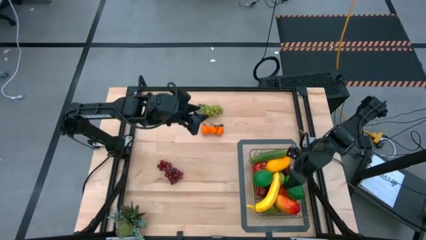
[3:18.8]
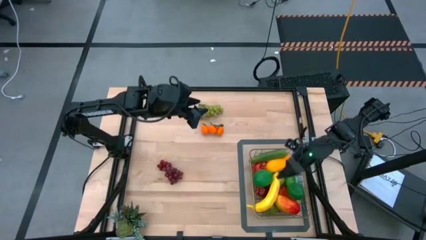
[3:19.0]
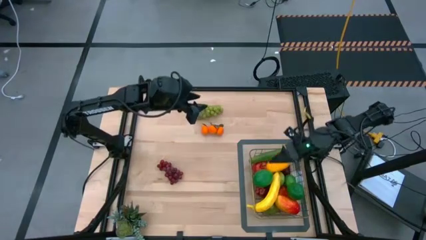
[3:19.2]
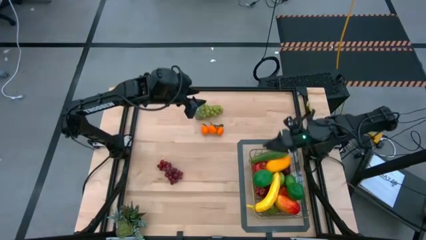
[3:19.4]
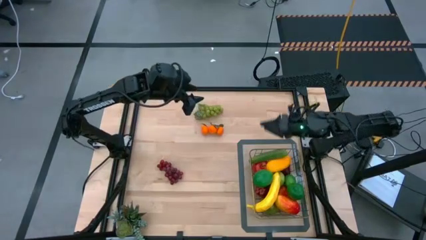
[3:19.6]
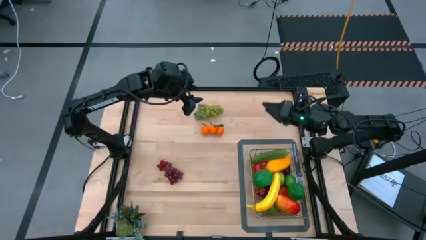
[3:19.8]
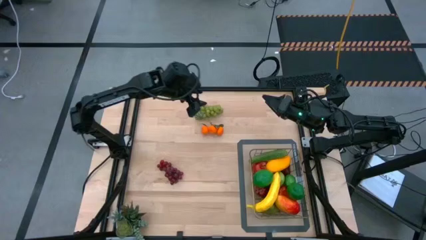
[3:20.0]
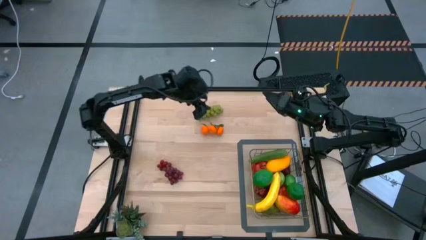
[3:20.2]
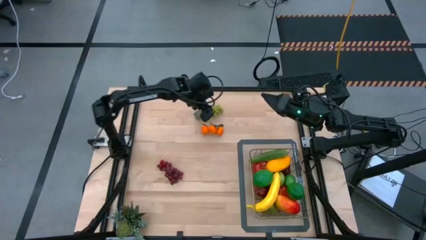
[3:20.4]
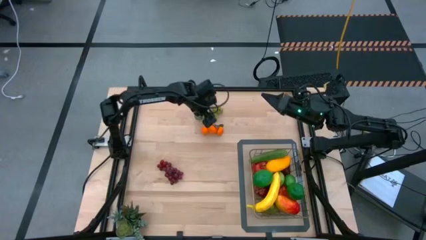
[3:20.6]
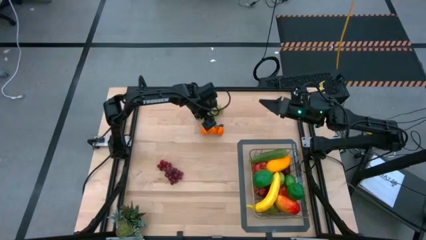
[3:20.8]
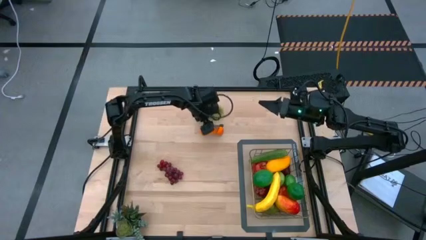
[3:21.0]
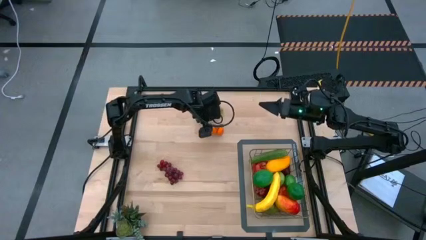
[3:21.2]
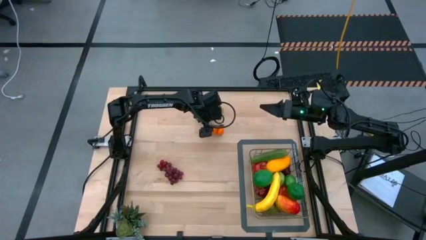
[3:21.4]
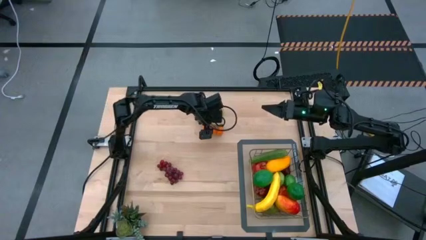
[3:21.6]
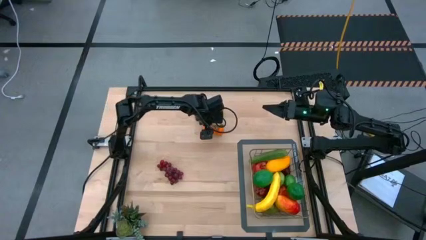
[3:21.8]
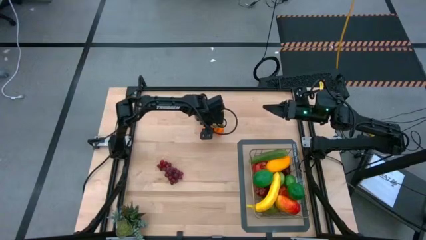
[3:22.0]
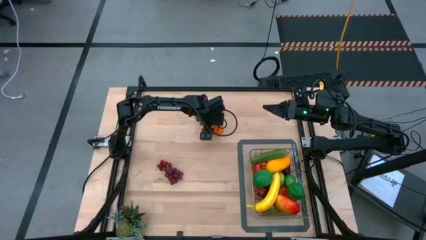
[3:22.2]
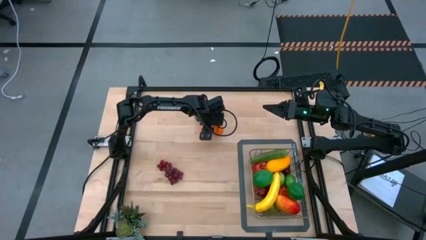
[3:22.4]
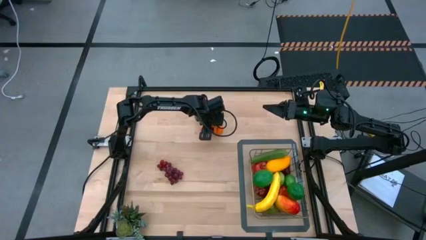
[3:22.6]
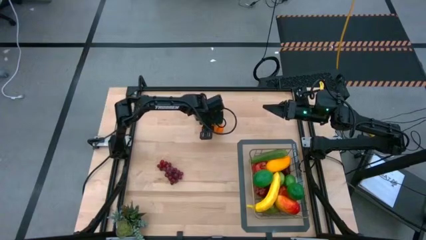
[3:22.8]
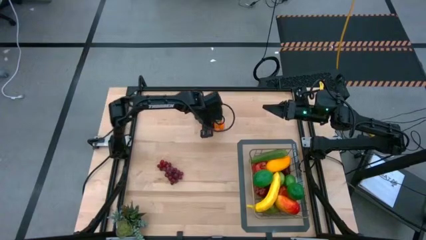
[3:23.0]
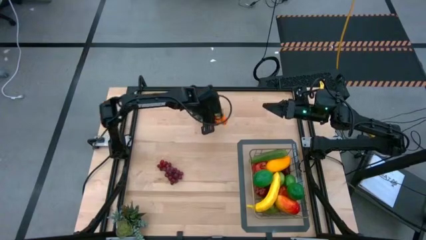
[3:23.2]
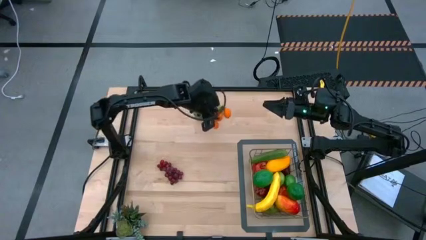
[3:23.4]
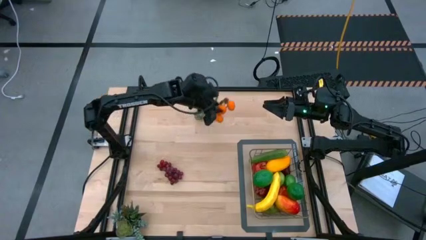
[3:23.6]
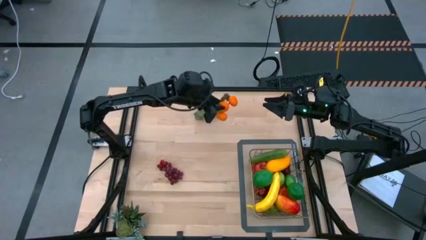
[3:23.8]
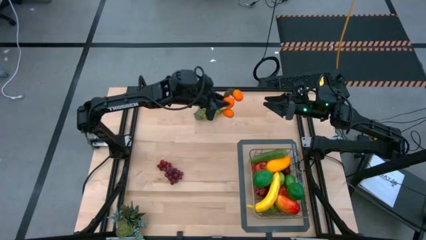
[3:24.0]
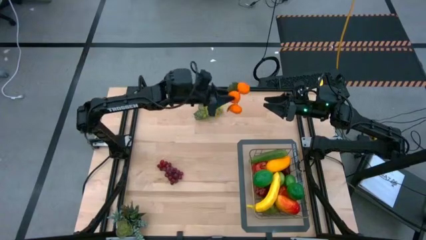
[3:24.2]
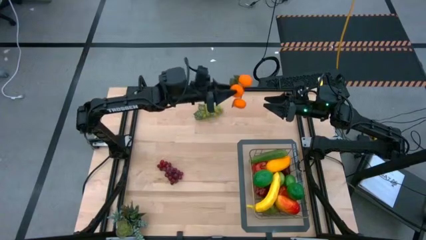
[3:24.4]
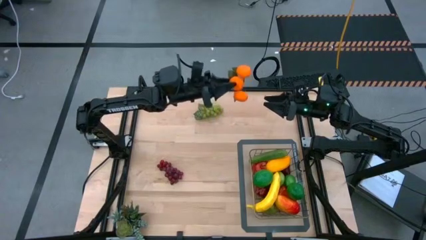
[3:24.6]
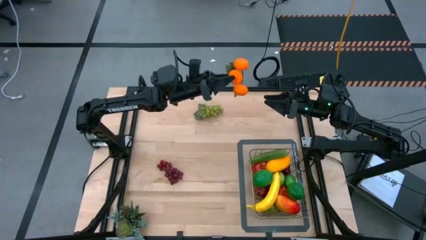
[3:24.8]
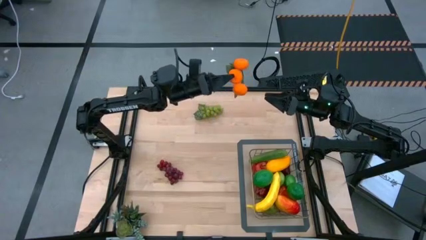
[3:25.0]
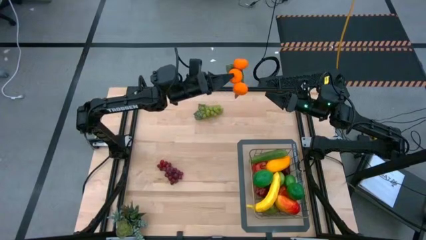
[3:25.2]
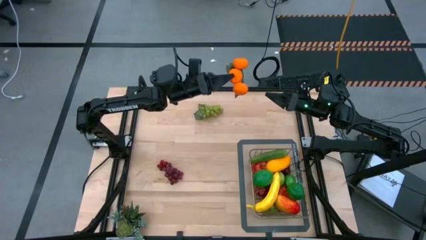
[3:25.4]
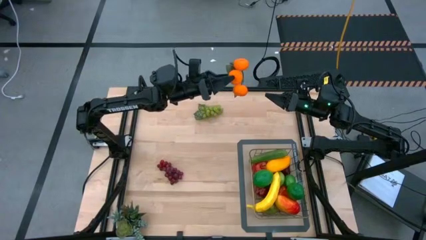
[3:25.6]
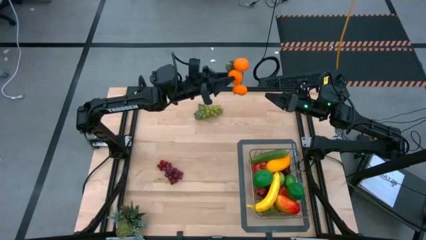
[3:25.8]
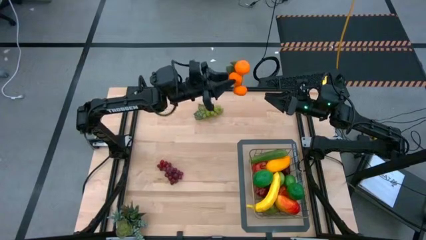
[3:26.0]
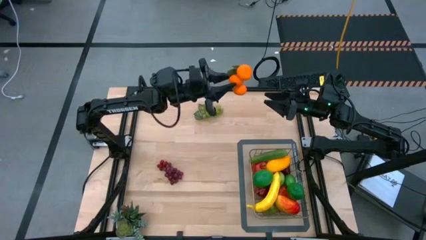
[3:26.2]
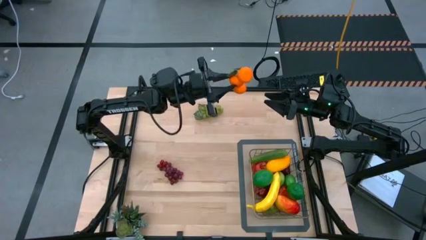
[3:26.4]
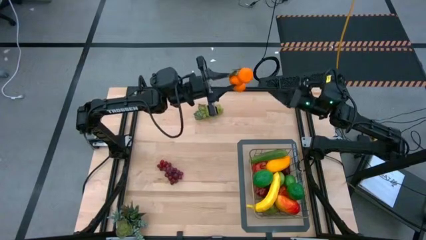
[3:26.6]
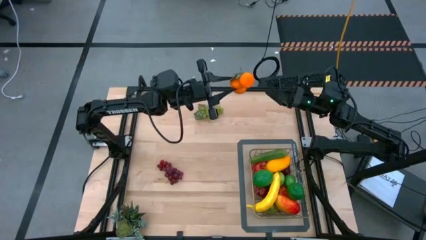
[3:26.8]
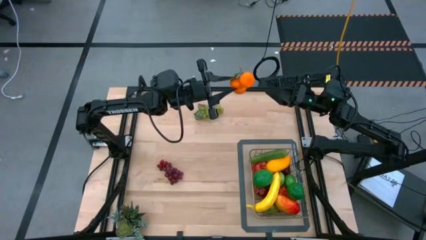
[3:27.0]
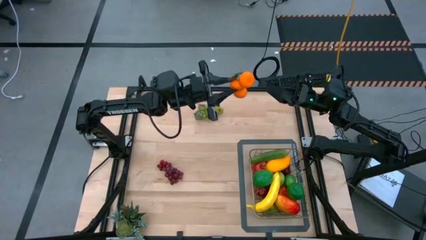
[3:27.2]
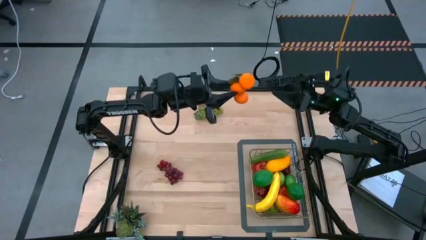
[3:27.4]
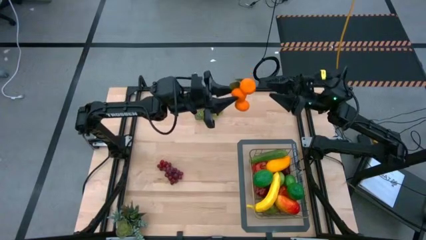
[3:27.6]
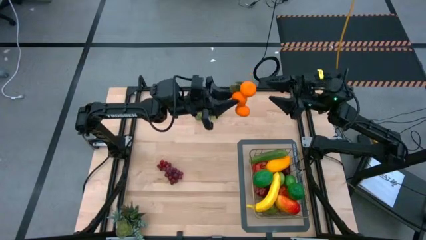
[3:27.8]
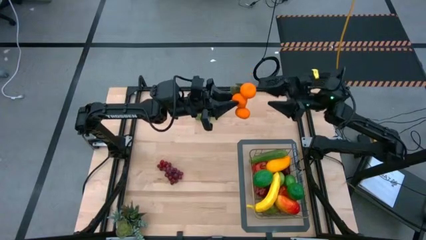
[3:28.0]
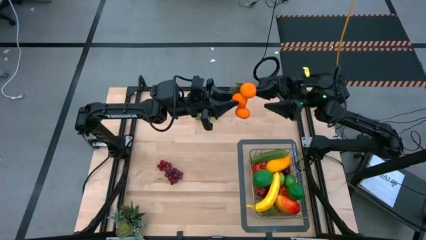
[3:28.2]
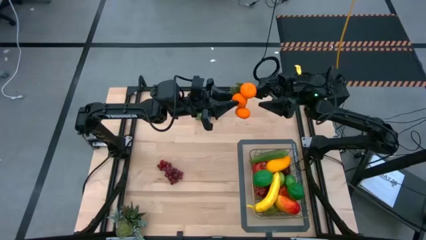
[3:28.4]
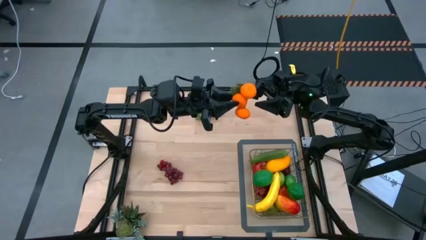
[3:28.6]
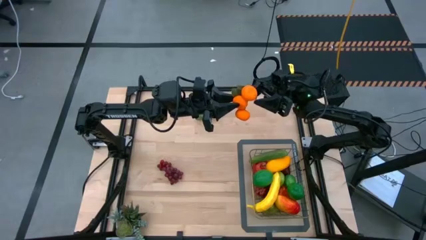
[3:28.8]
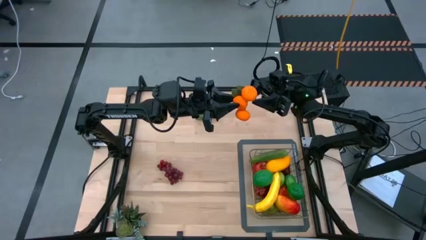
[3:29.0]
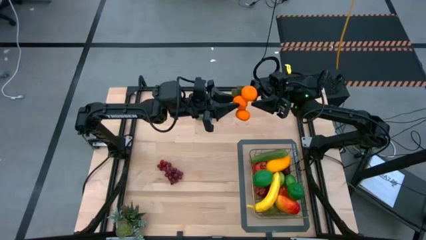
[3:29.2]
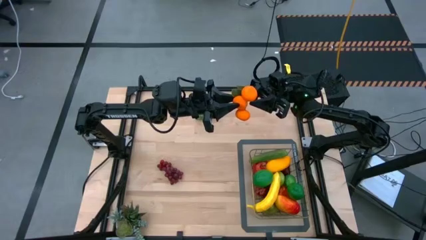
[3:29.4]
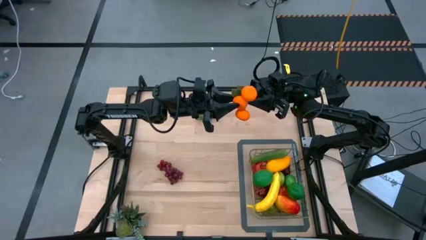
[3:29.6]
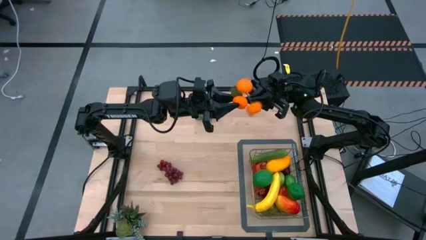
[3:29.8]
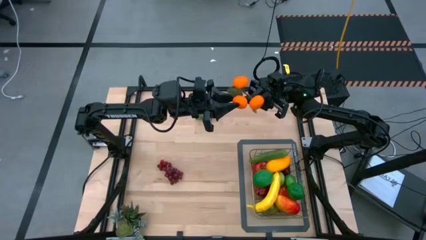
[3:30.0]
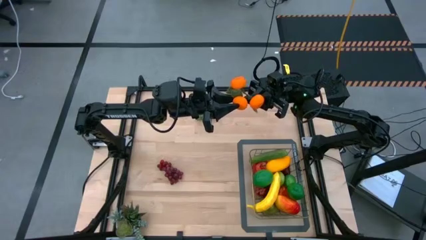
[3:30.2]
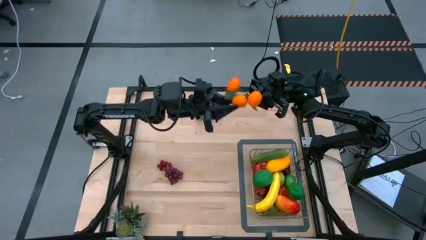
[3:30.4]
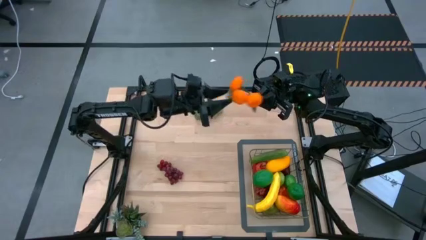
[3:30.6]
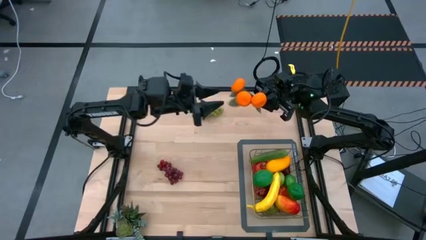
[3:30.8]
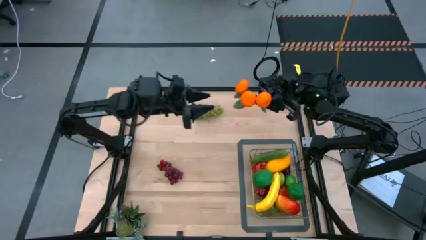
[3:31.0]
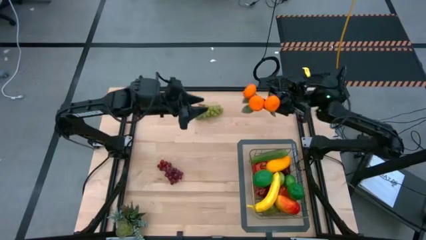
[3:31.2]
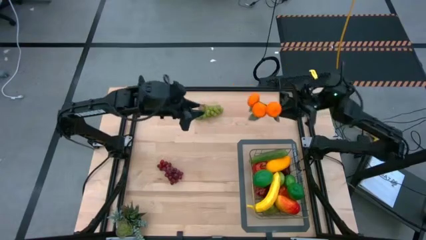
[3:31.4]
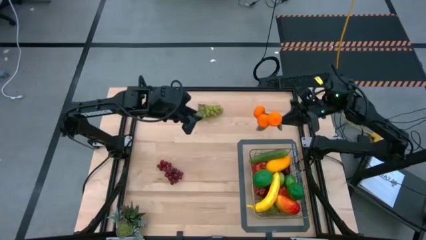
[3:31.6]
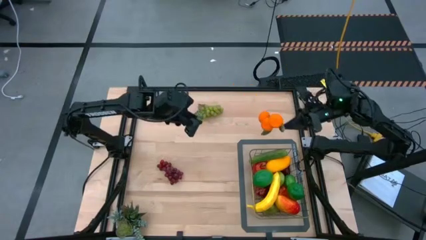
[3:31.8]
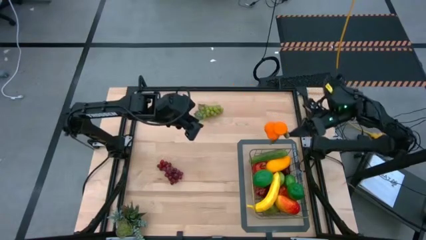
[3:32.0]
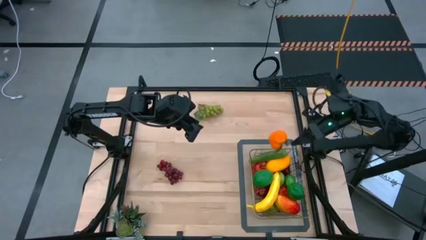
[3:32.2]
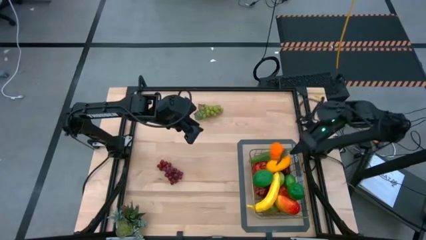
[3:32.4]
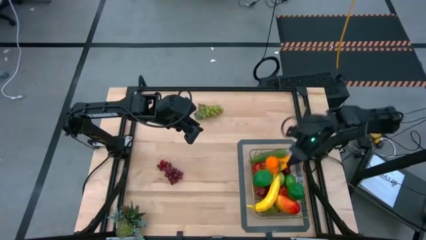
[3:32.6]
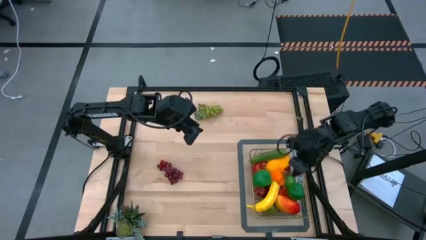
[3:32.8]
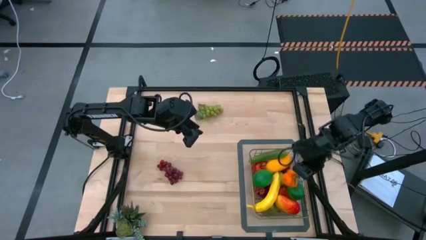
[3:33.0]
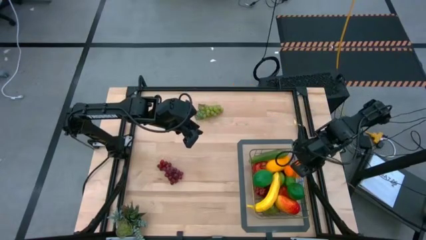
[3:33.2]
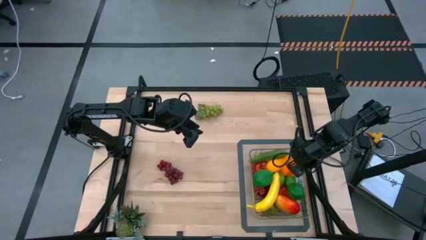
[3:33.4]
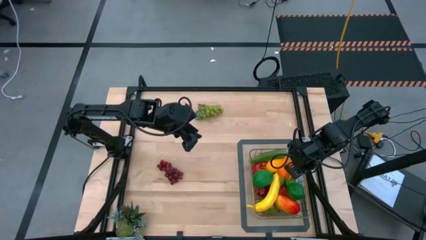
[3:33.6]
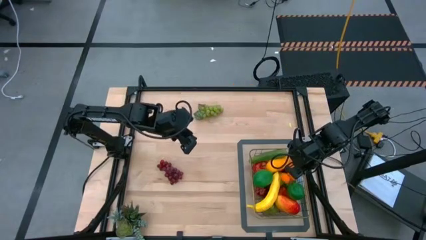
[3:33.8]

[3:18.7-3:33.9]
Task: Build produce basket
Put the orange tangerines into the wire basket
